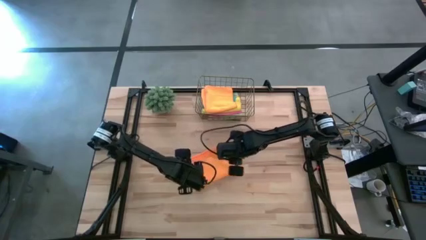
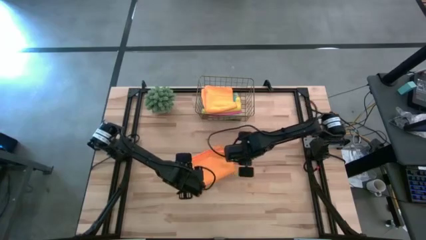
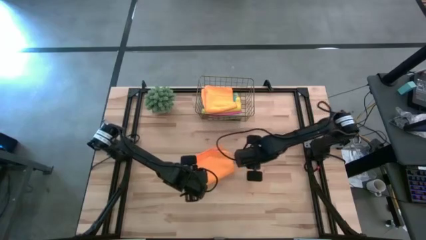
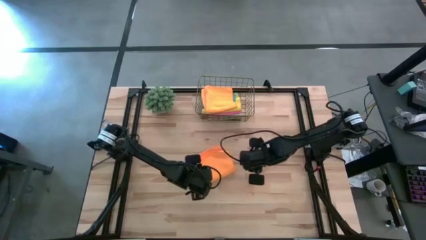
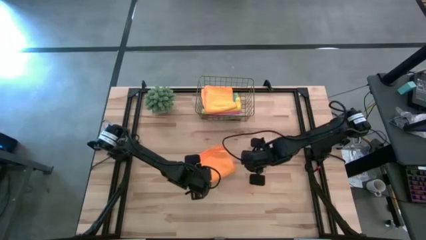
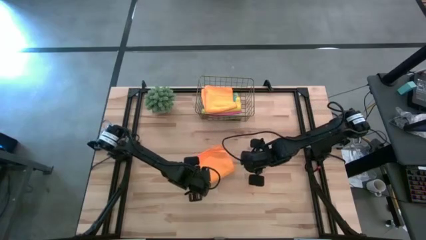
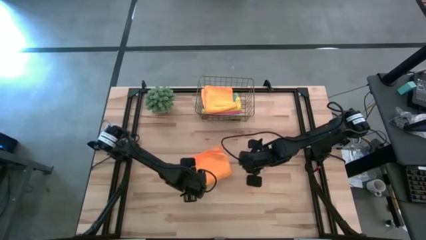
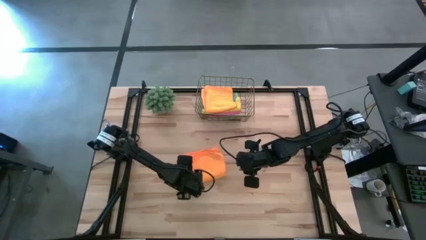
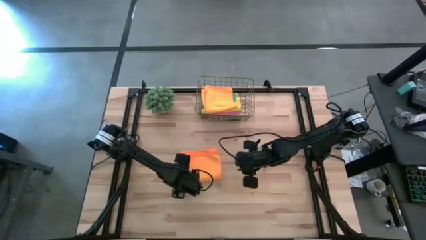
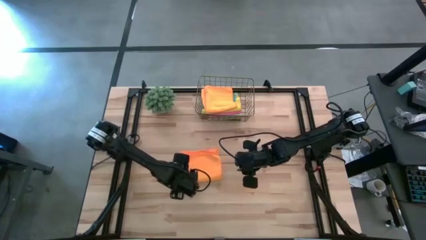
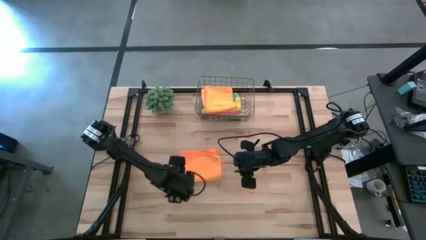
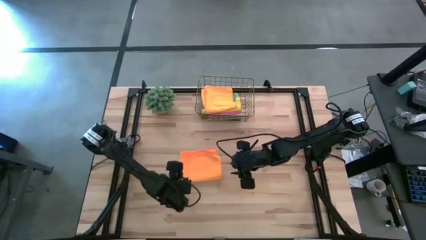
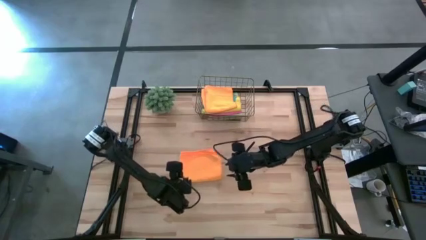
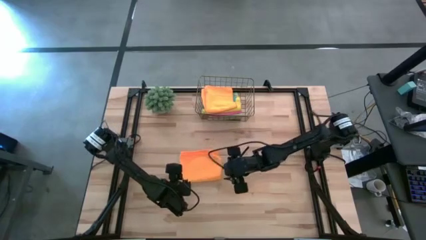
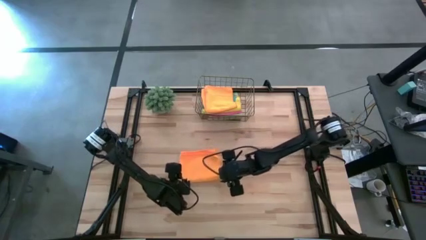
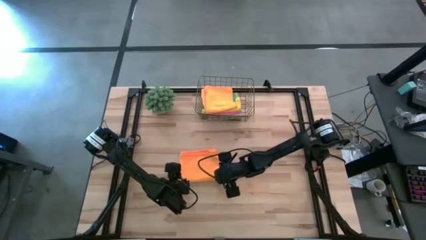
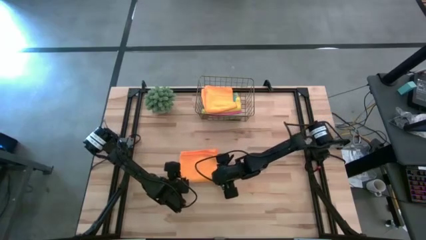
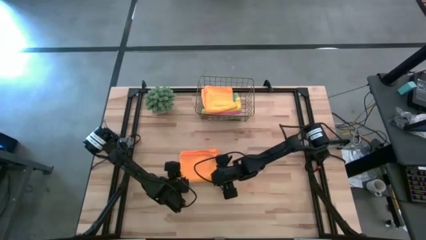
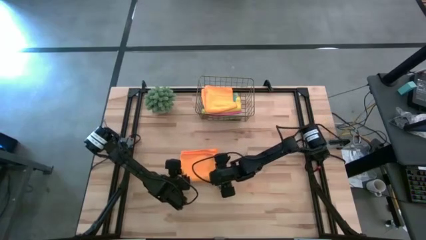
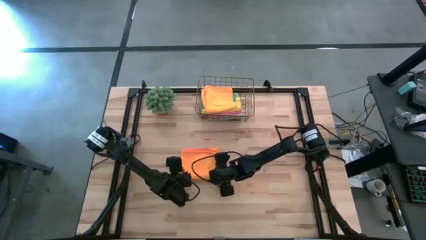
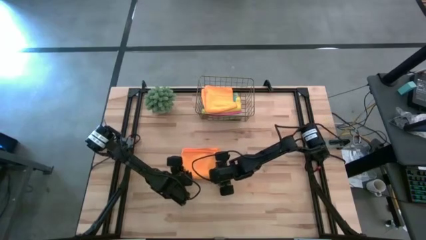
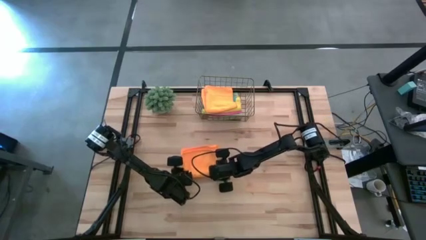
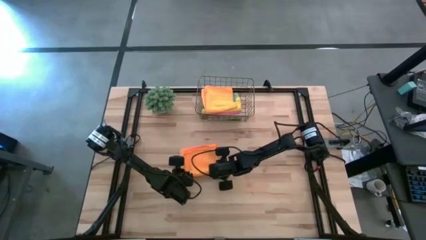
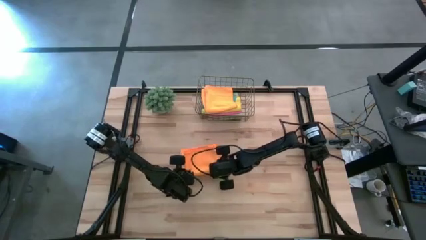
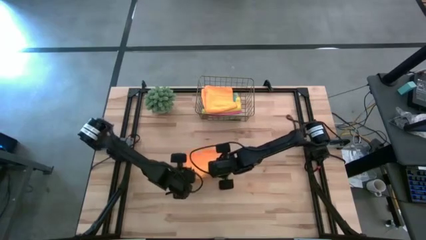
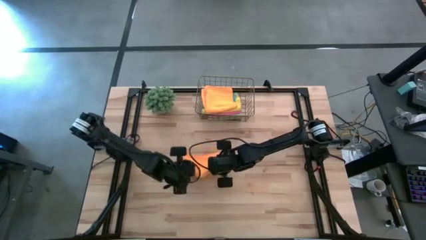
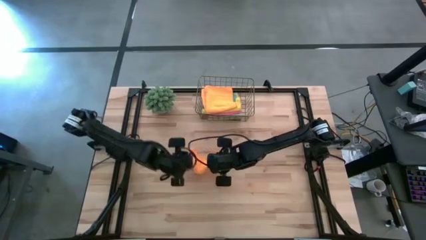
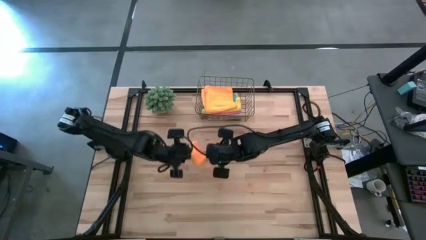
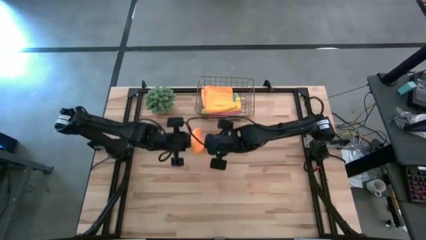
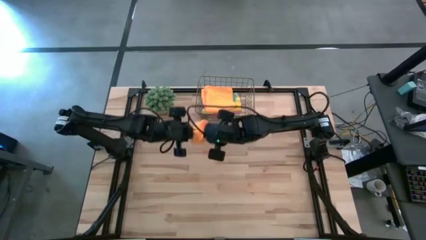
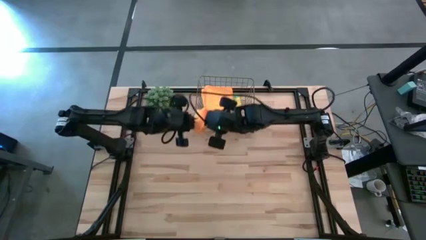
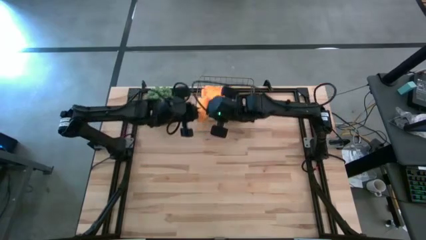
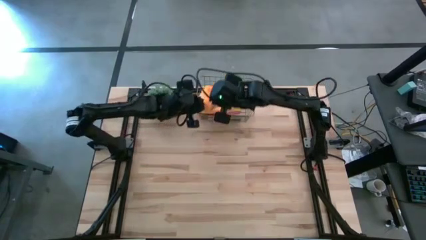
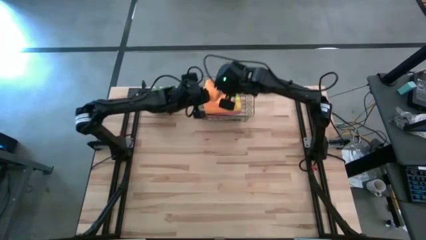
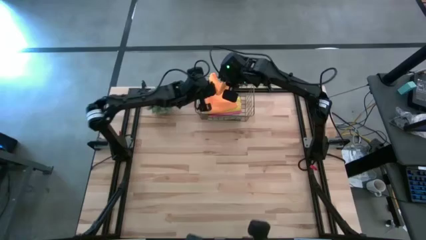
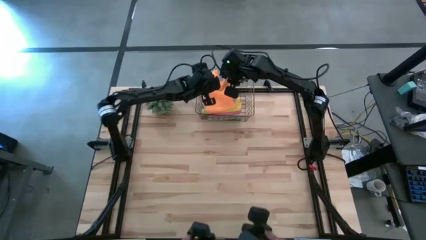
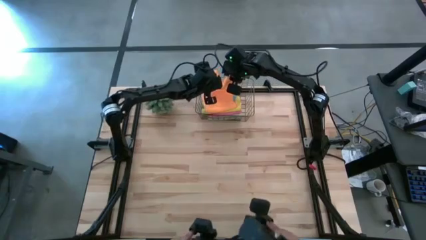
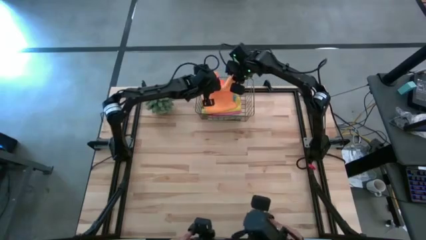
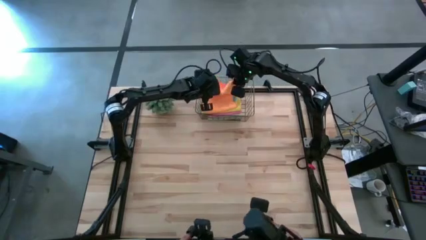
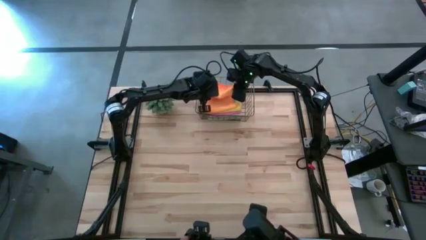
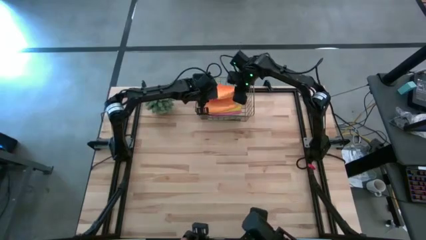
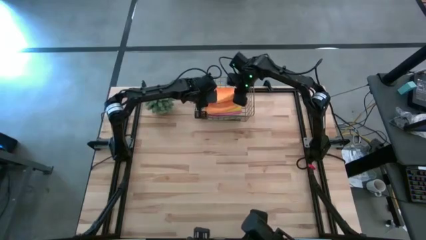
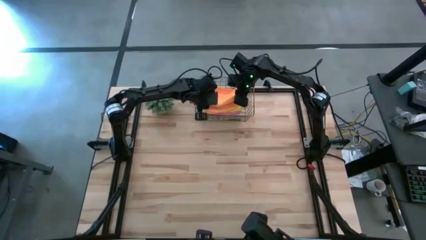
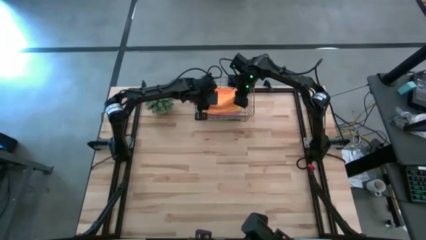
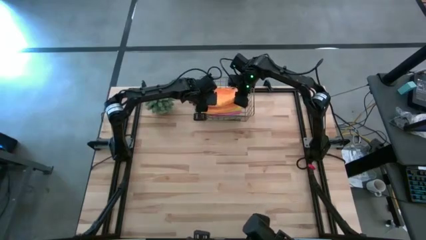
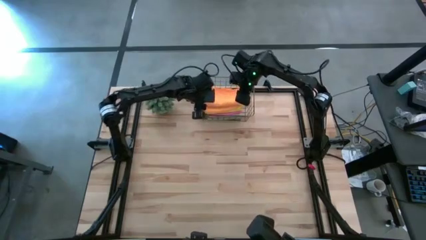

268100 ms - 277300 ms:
Task: Fold microfiber towels
Put the orange folded towel into the wire basket

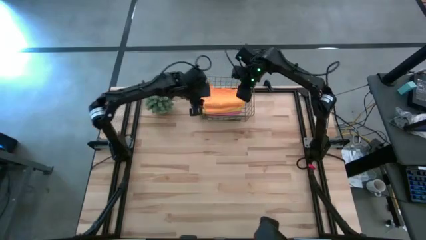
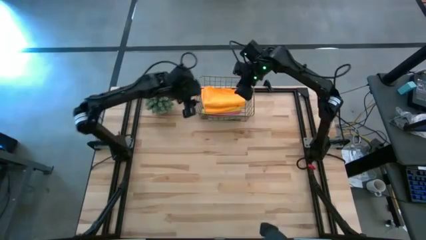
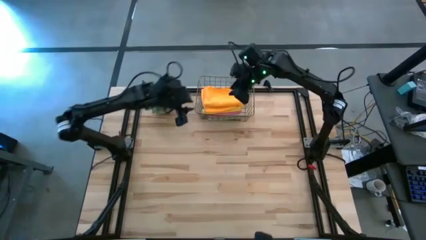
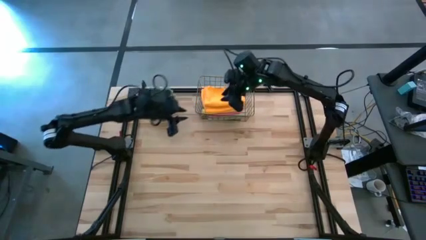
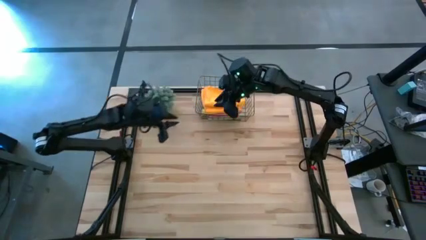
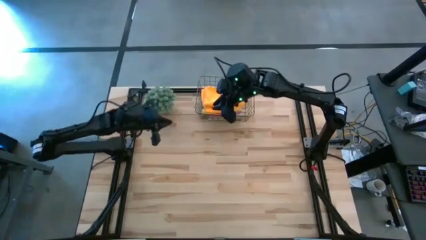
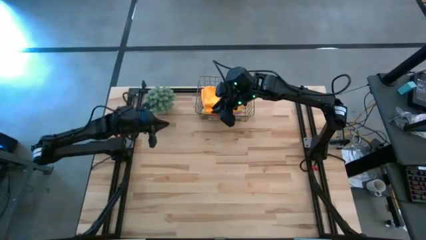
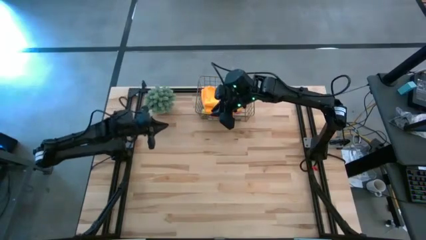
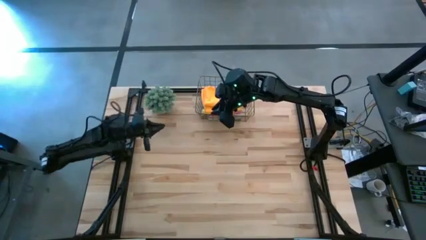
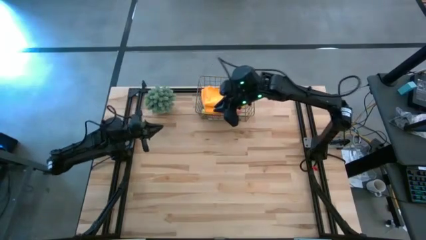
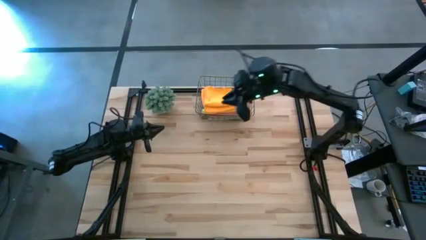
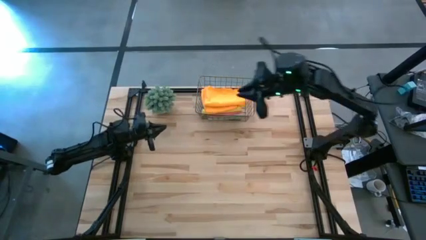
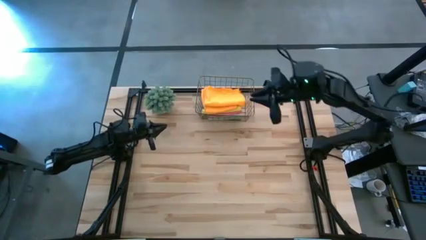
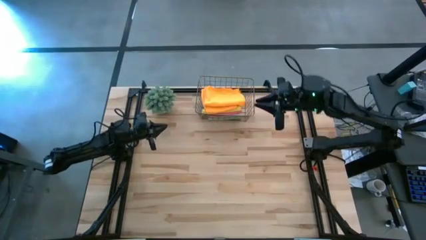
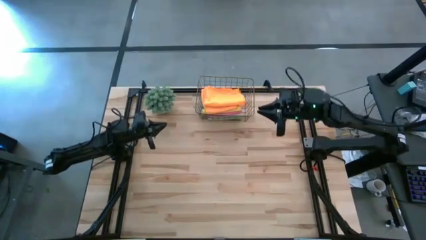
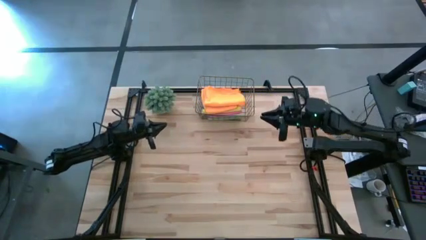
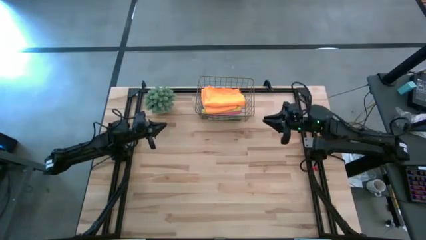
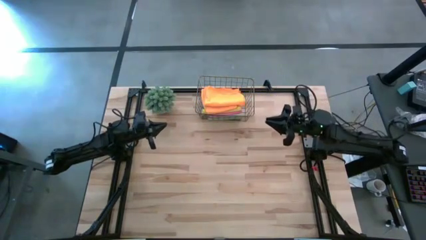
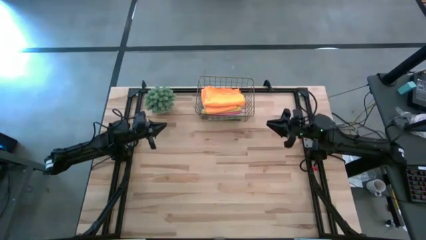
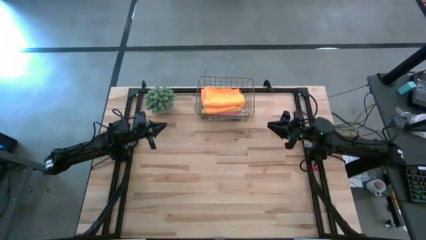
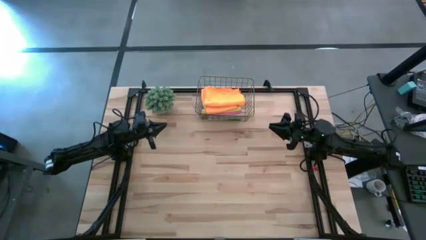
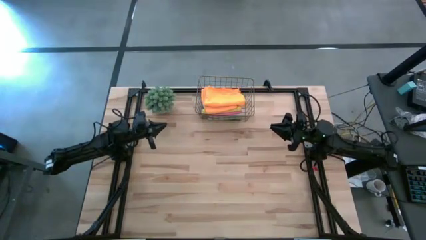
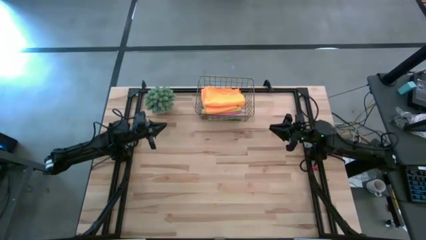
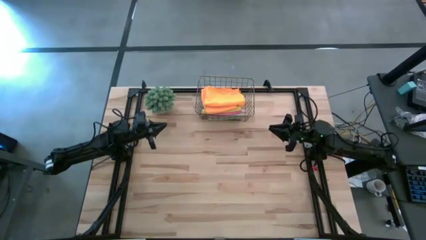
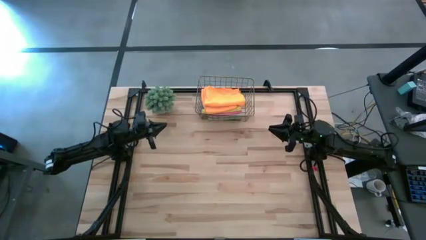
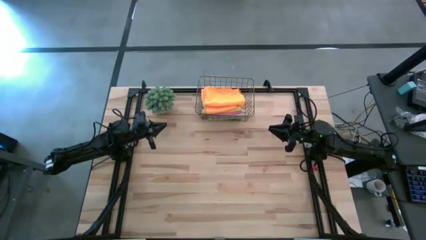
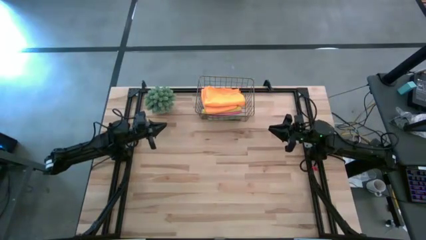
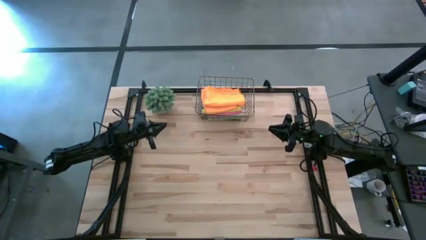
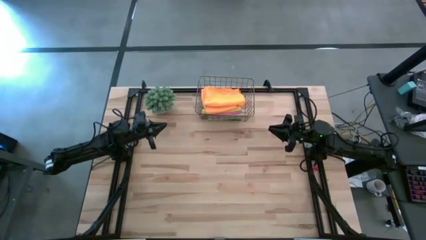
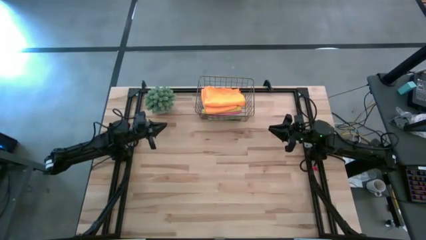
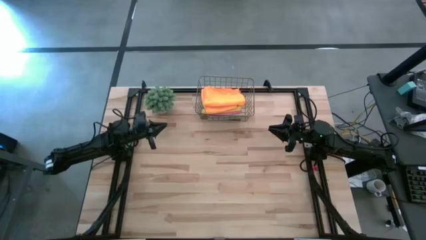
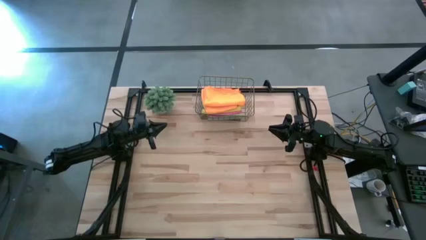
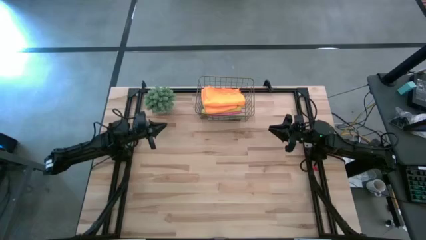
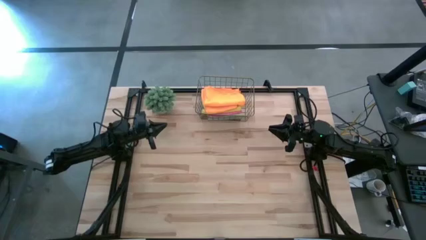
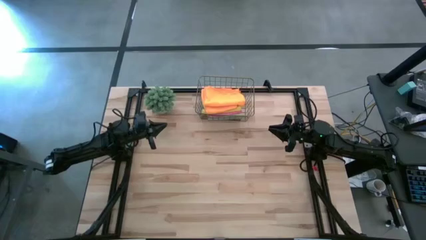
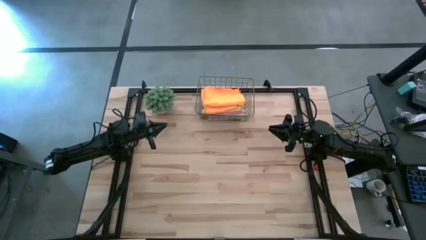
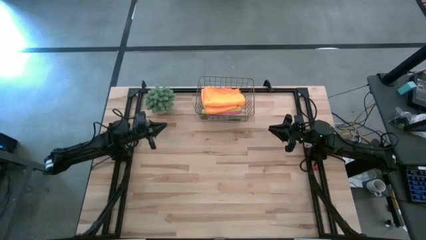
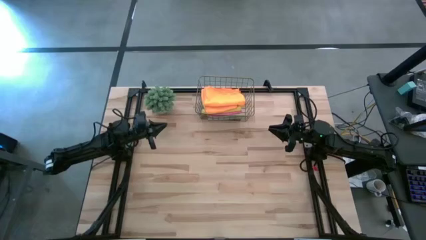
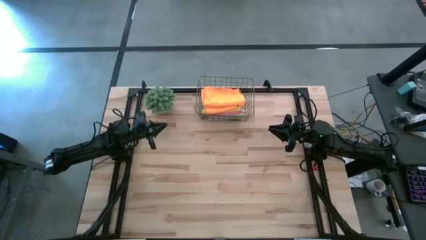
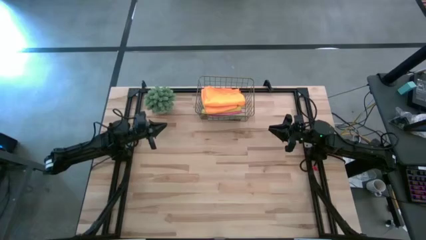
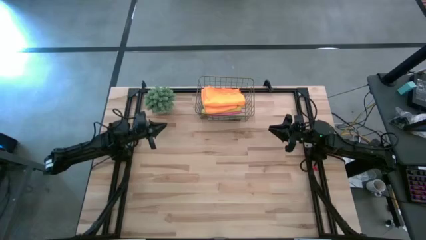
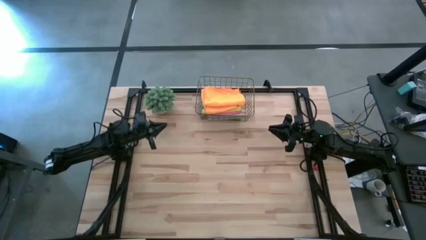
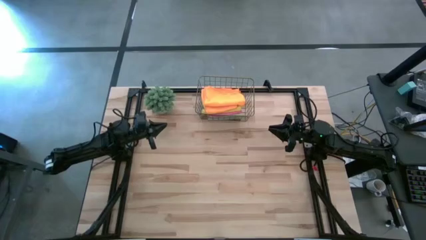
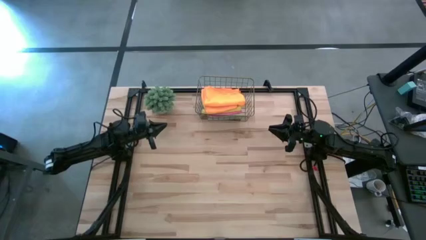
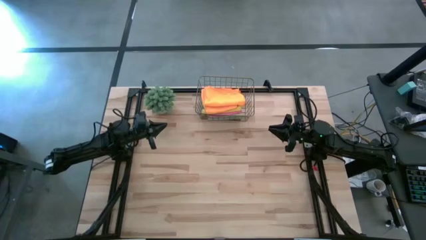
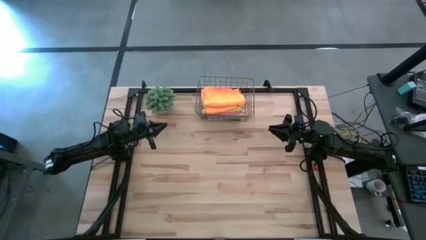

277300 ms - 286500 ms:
Return to Home Position
